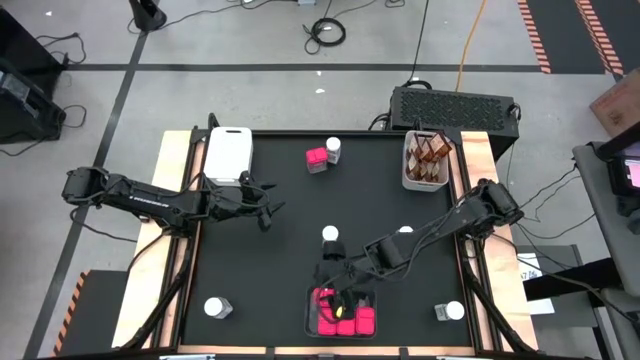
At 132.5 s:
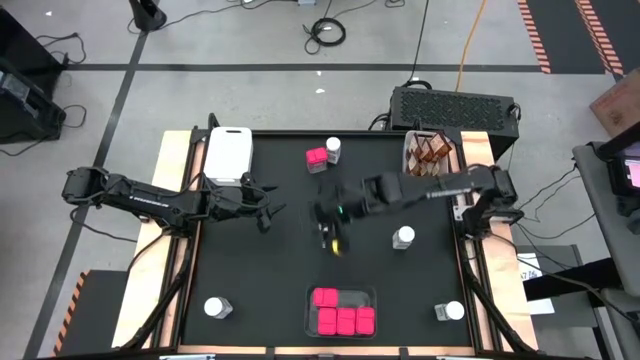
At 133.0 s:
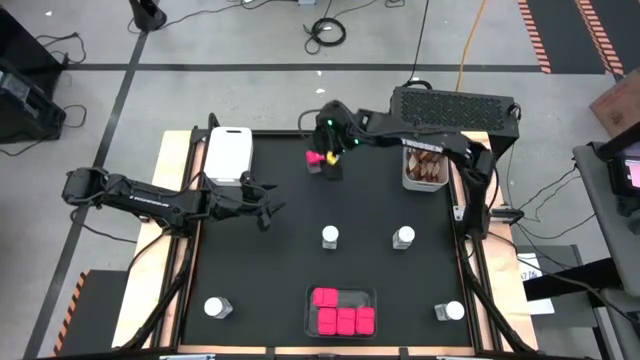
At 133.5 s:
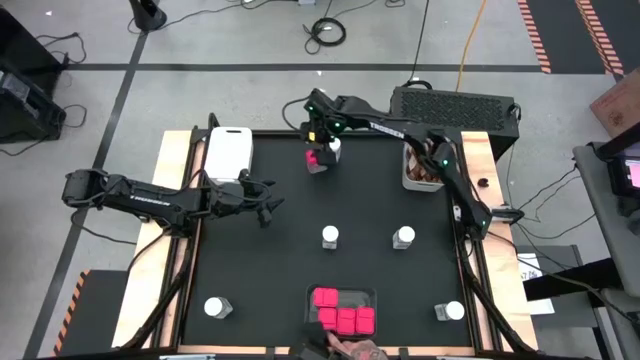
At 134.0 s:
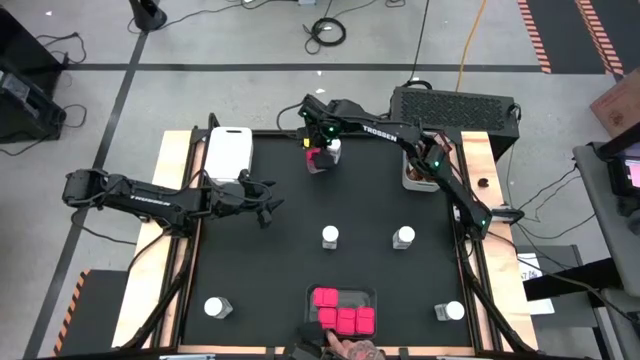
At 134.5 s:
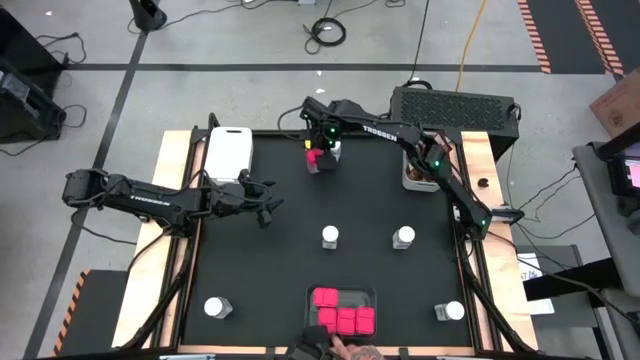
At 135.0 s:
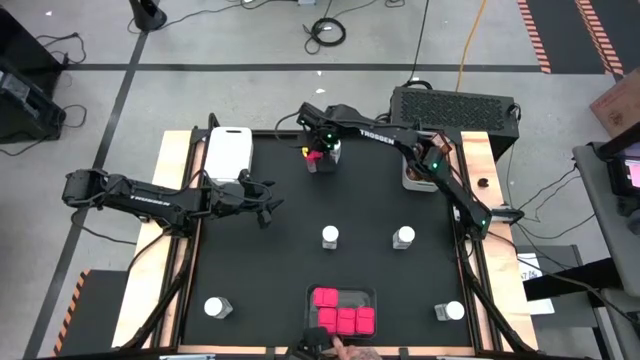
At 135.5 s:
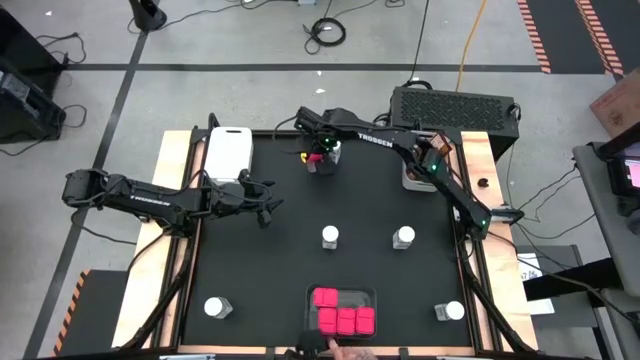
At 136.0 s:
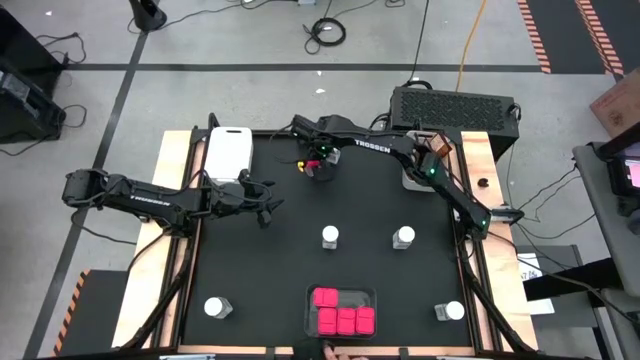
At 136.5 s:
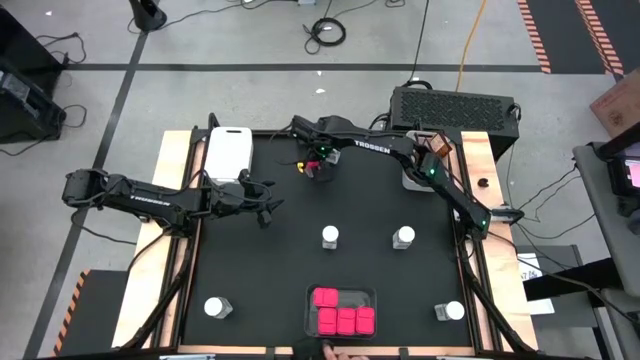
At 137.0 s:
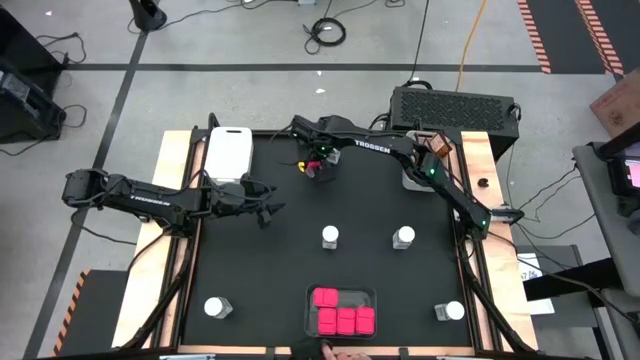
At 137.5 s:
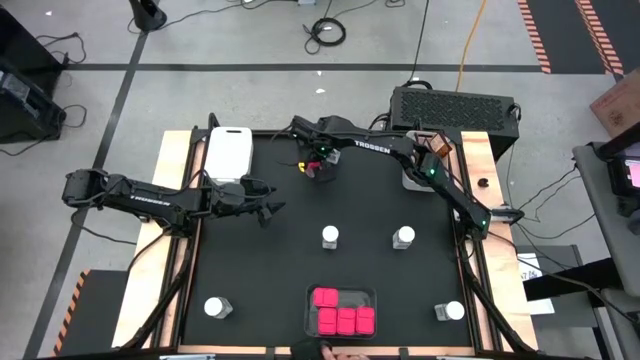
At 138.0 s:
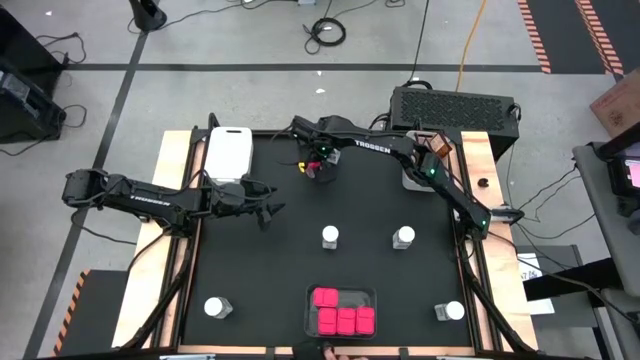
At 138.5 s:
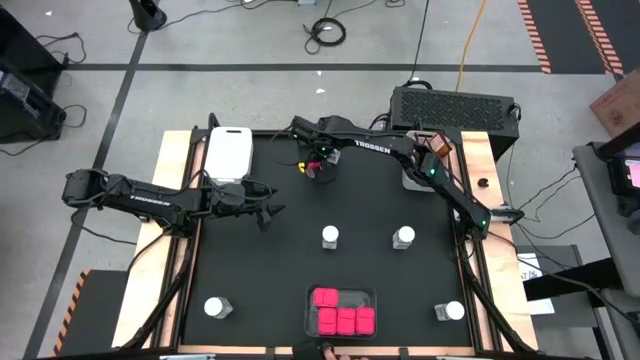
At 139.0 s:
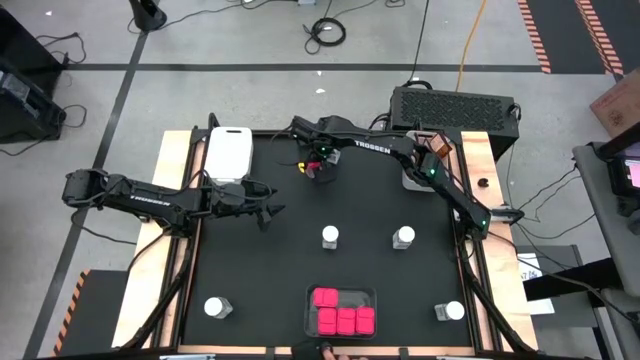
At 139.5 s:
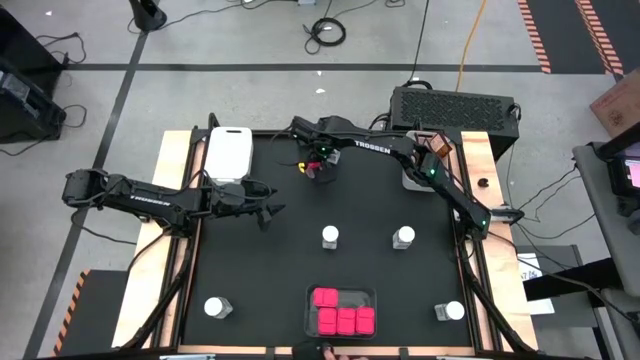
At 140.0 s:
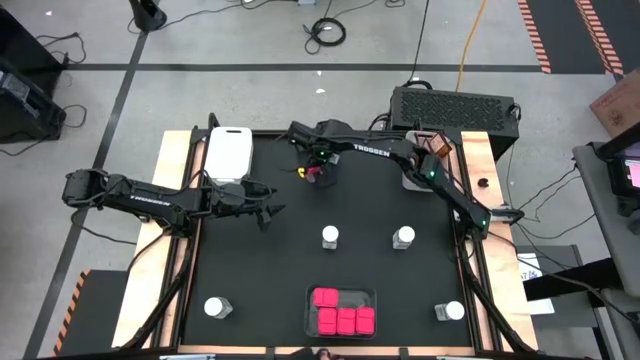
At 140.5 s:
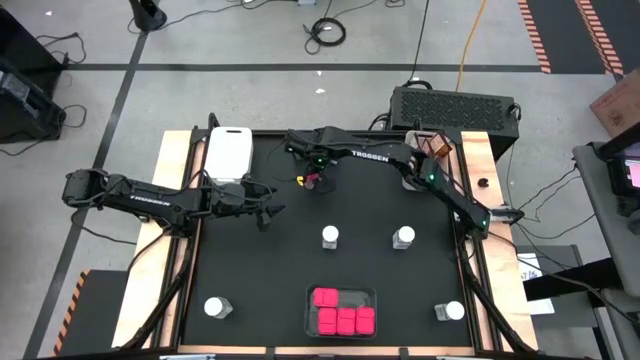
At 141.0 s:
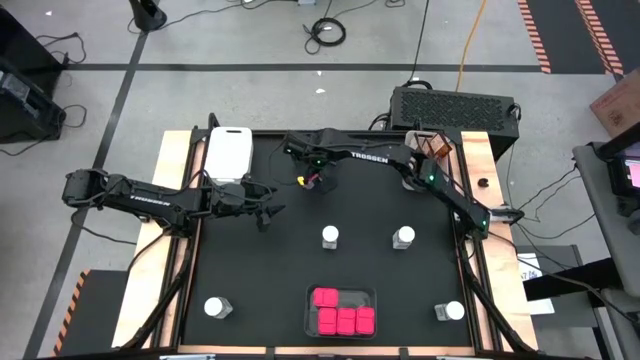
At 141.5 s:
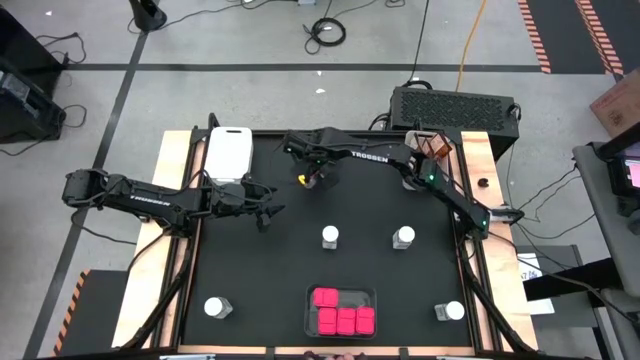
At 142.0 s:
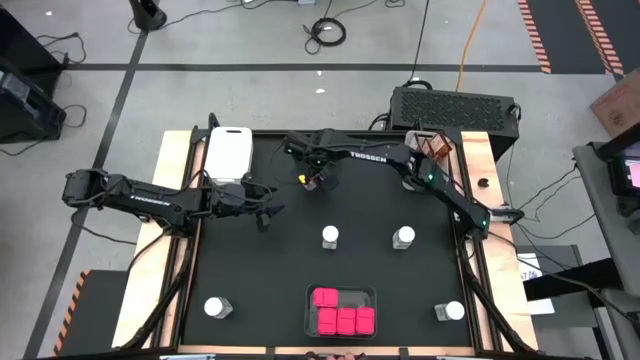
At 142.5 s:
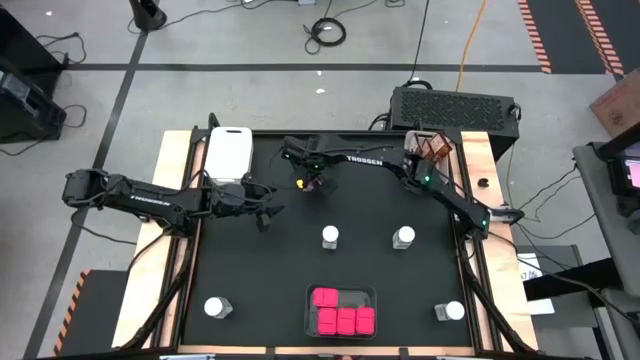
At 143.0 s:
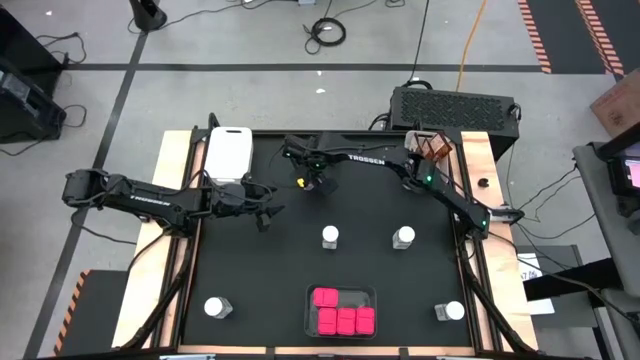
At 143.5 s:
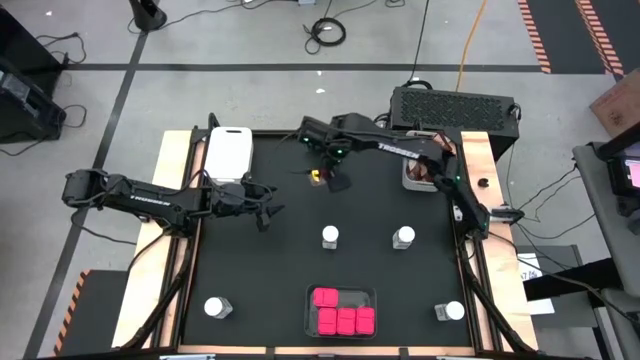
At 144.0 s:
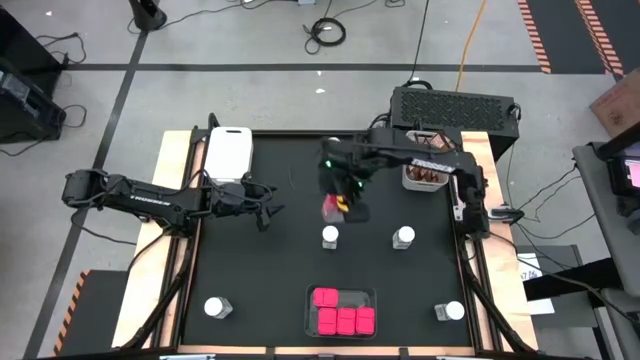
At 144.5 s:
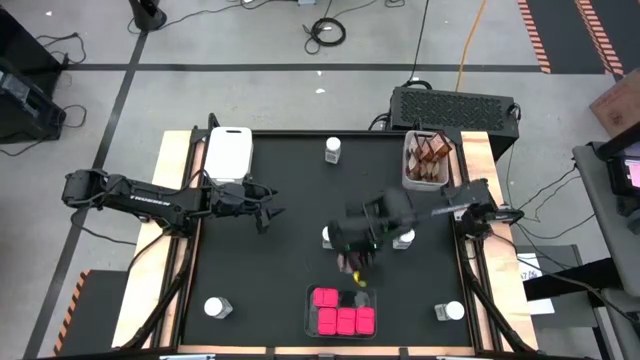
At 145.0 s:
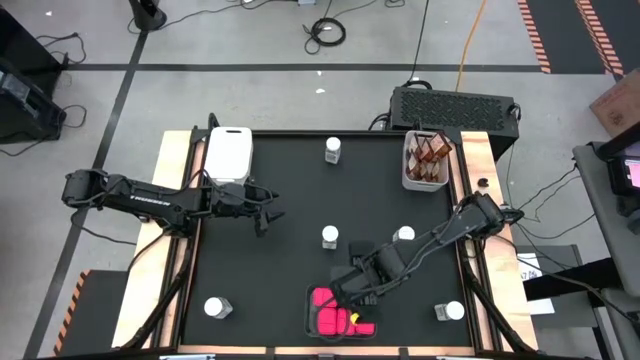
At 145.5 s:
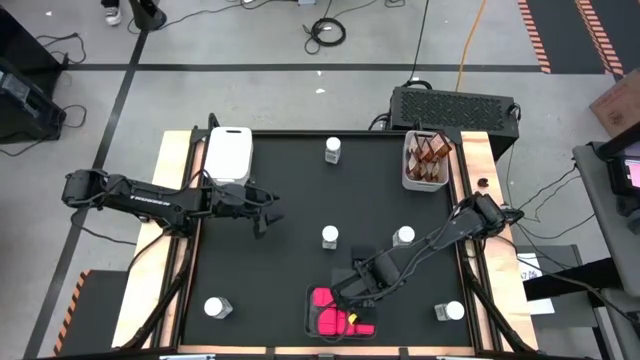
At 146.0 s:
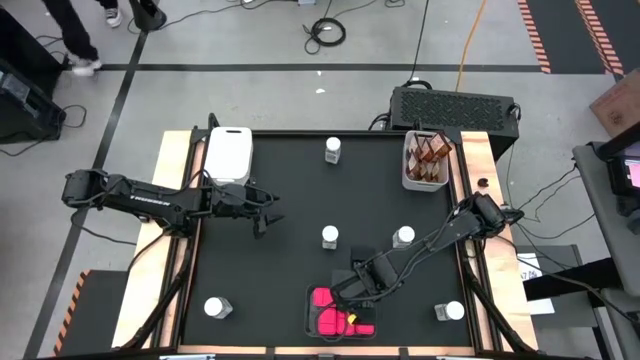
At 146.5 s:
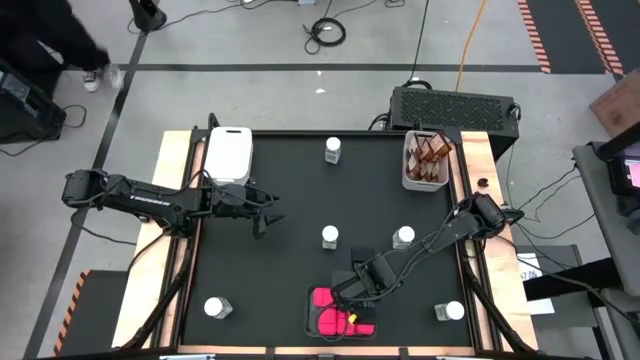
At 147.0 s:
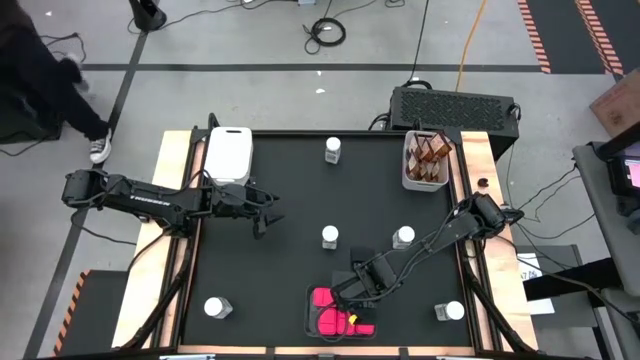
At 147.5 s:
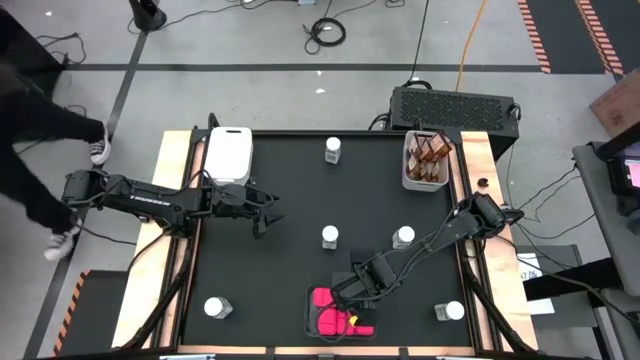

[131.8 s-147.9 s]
Task: Sort spices by type
Put the red seasoning can into the black bin

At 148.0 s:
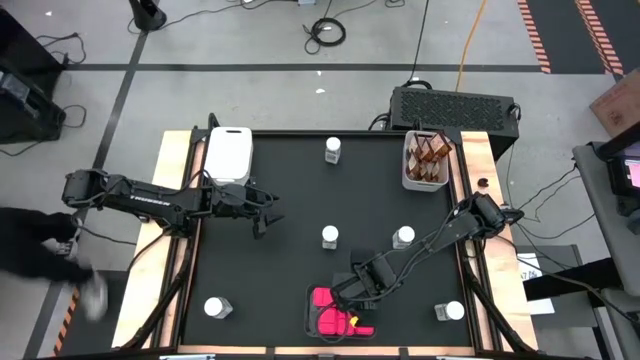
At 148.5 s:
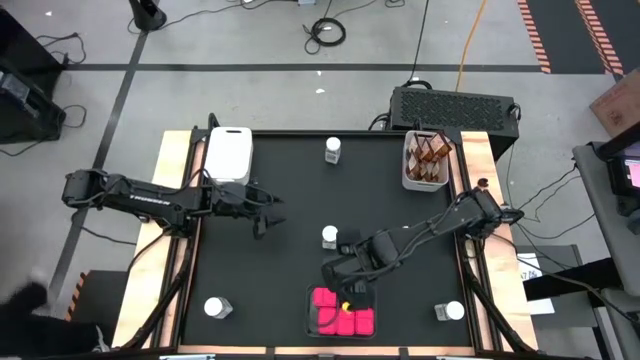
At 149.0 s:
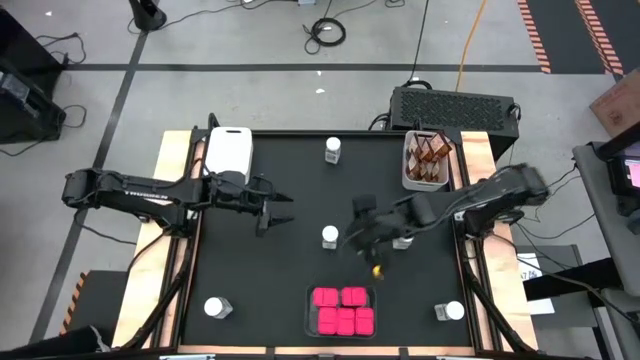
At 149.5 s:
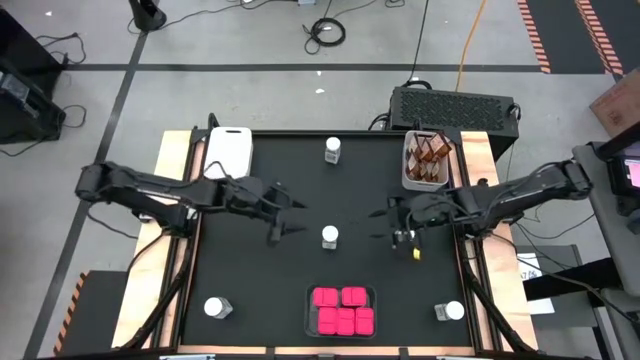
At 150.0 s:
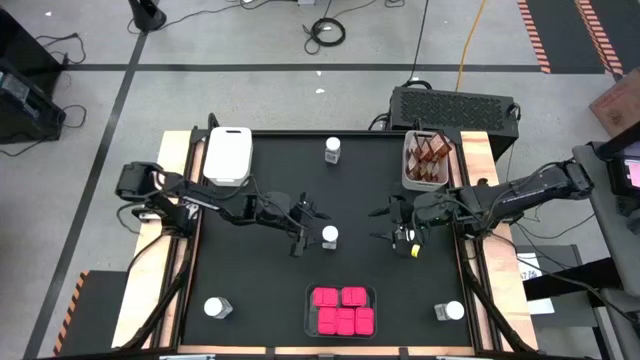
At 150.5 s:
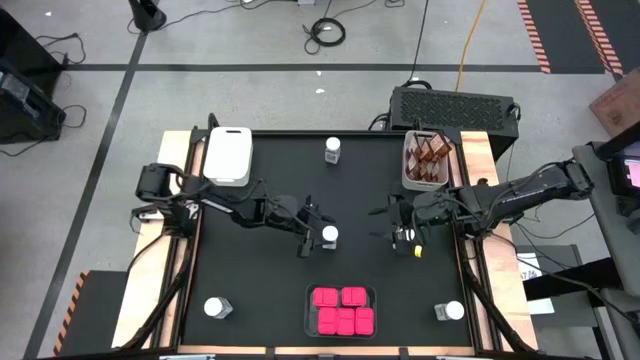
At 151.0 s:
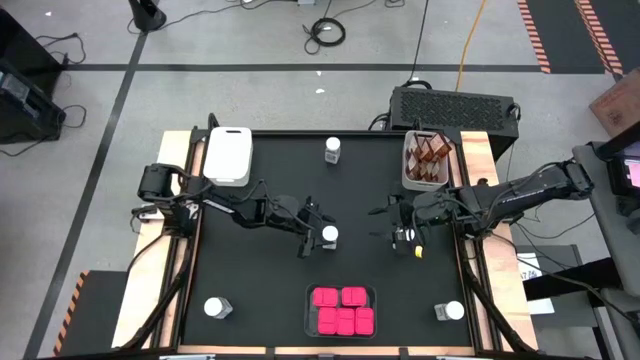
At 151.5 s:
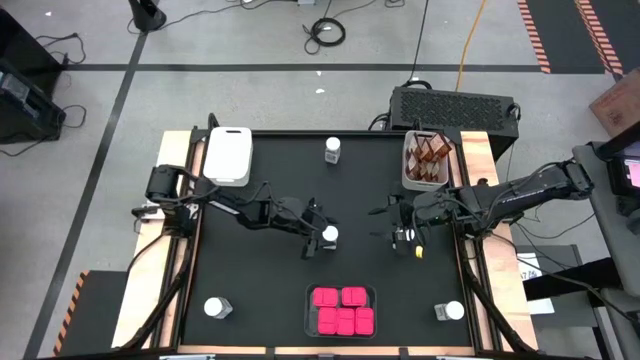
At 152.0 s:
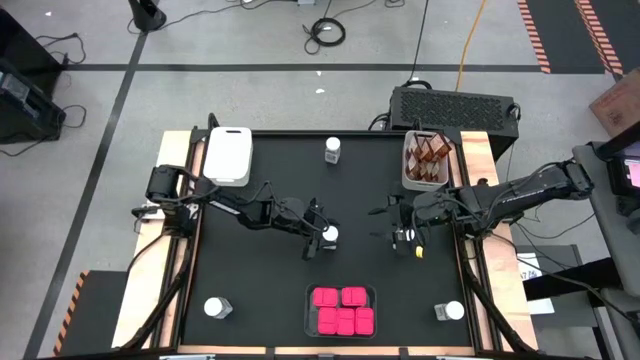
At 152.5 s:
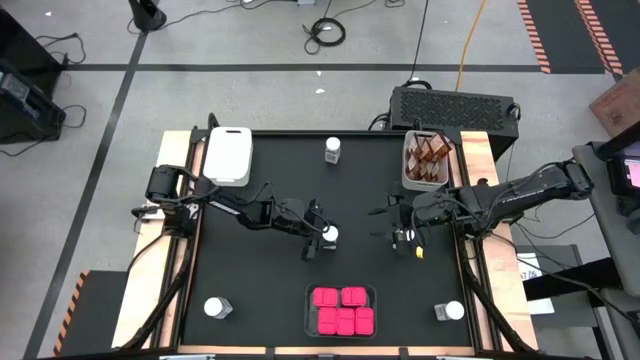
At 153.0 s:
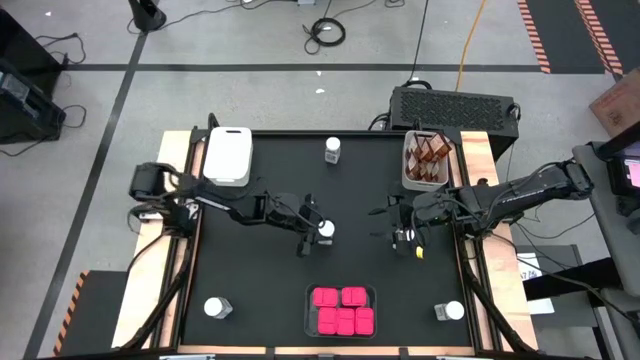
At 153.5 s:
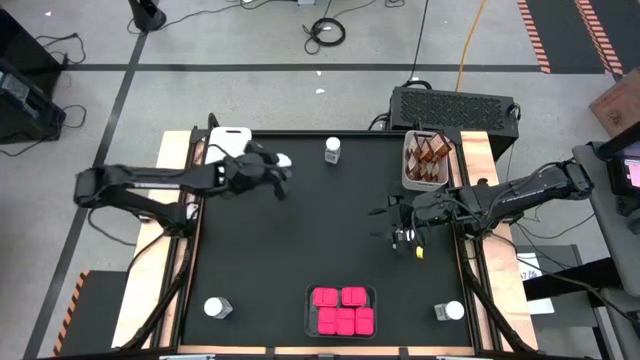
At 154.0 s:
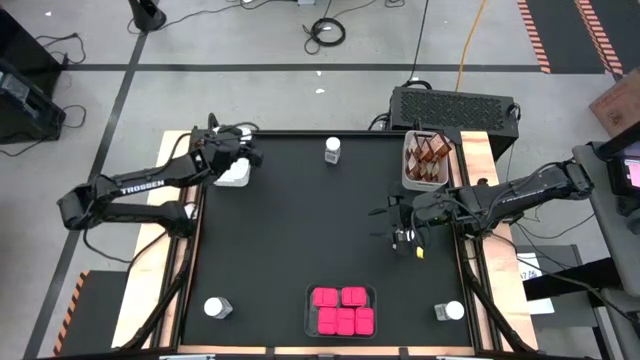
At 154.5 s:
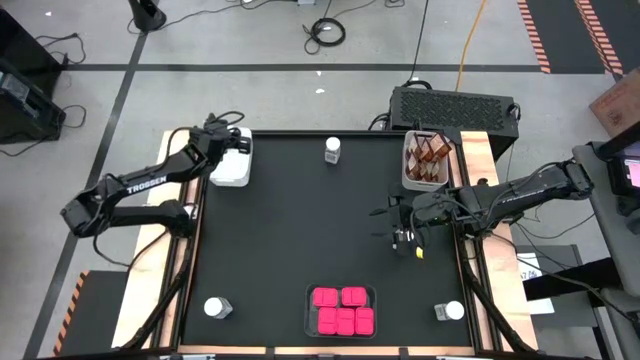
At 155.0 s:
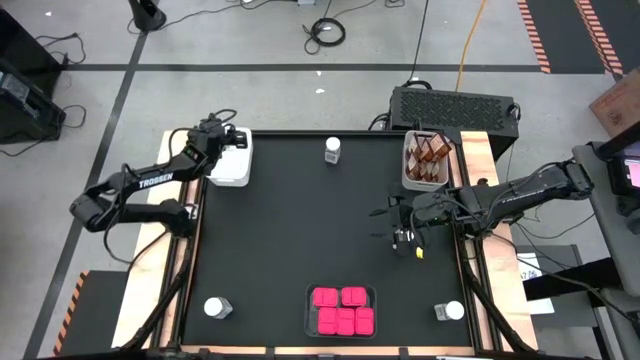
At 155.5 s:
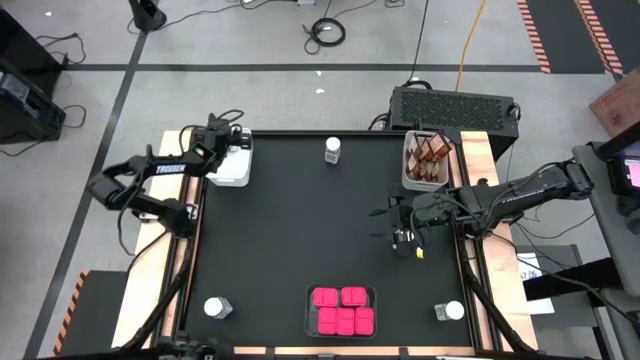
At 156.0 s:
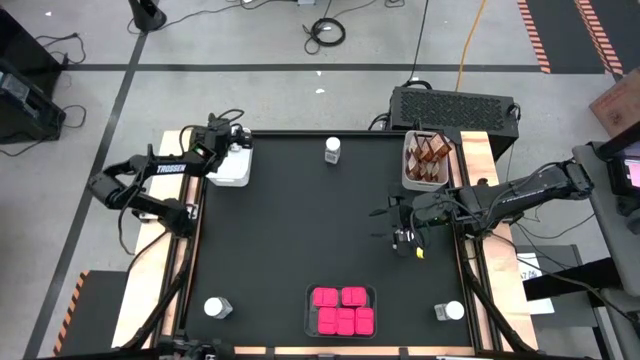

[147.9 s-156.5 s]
Put the white seasoning bottle into the left white bin
